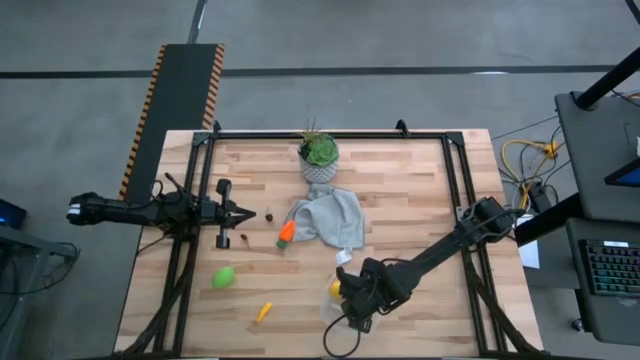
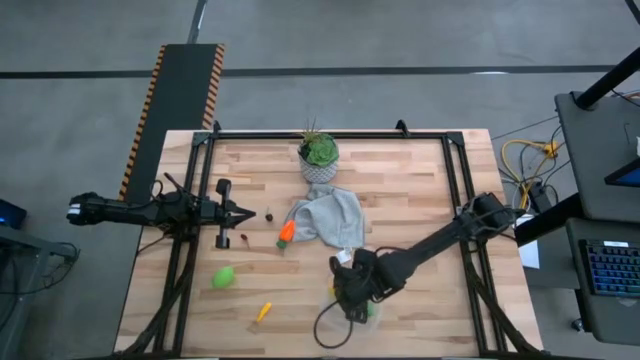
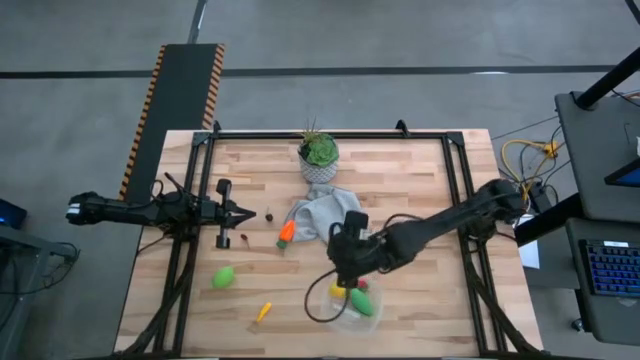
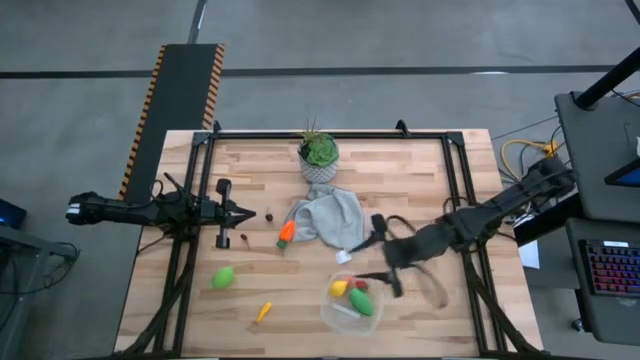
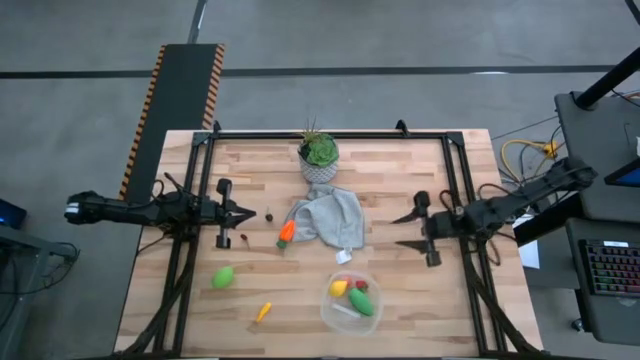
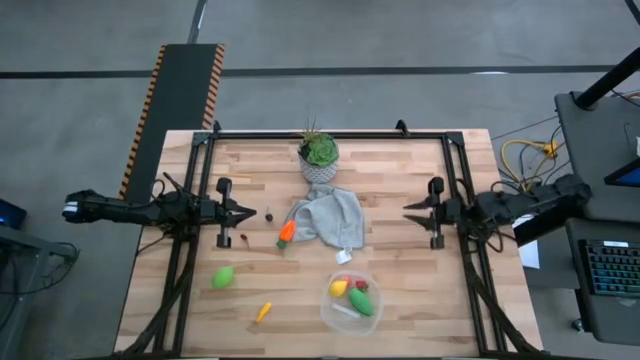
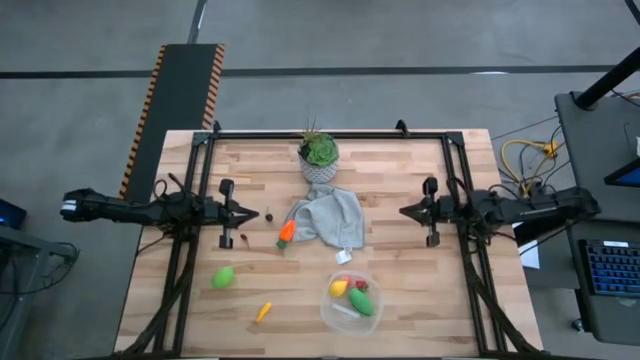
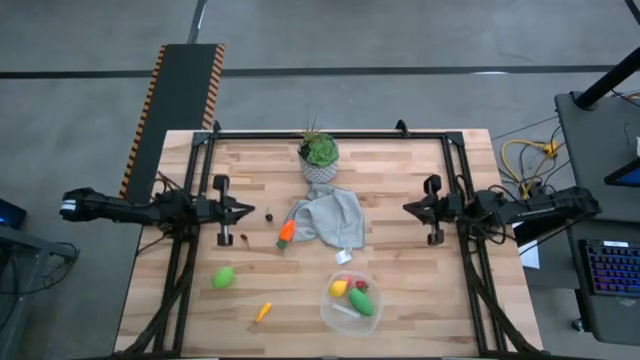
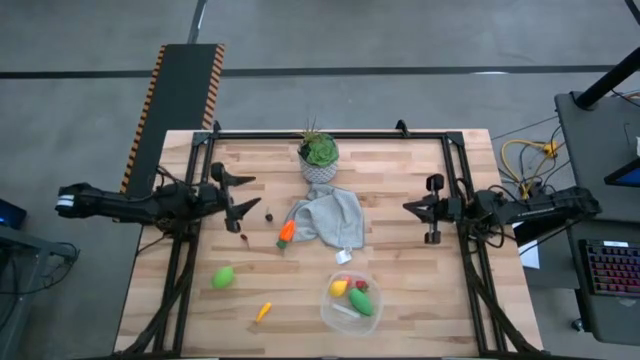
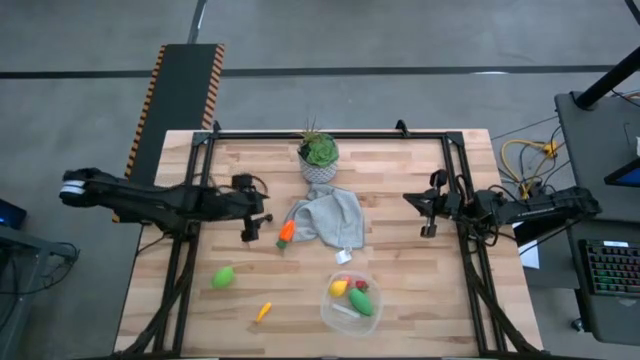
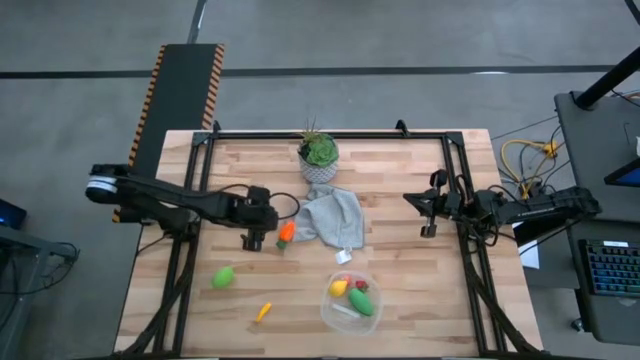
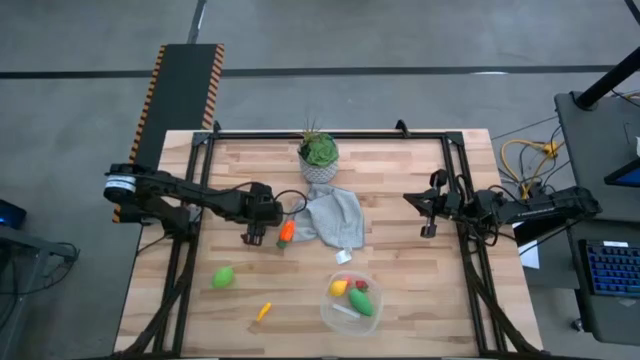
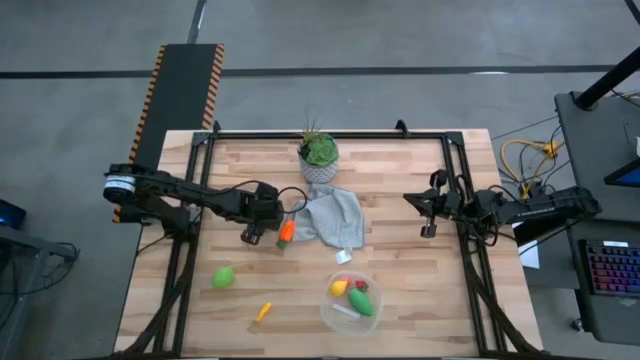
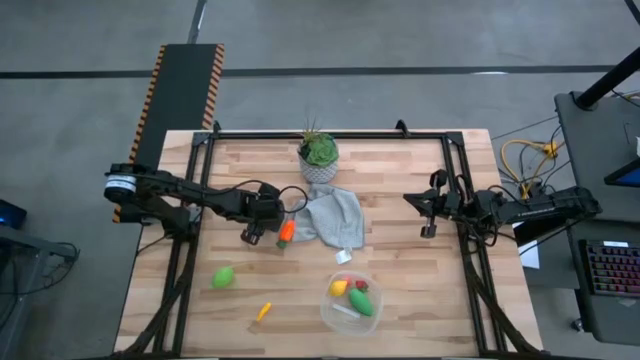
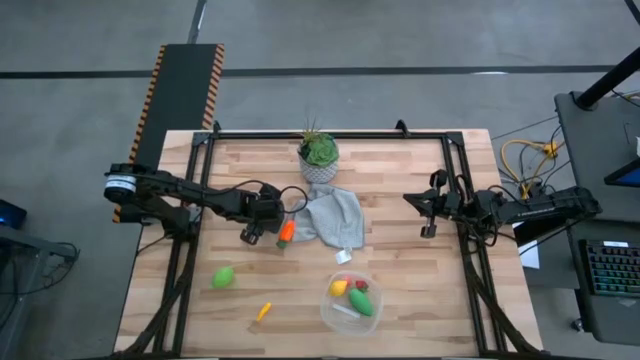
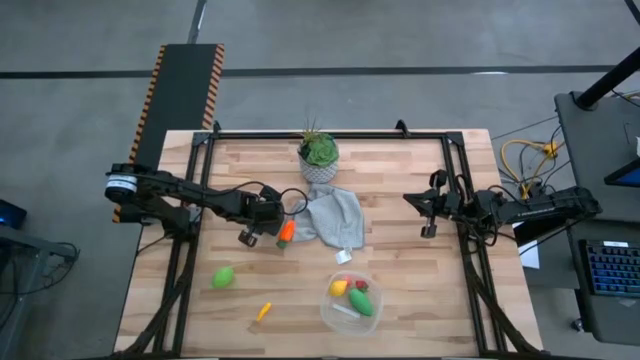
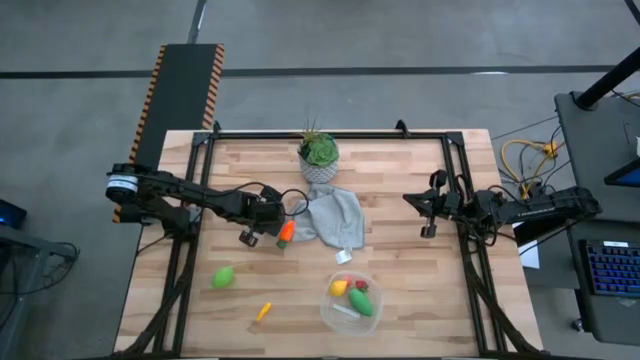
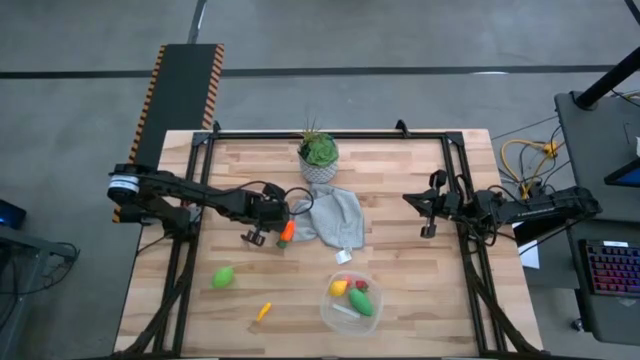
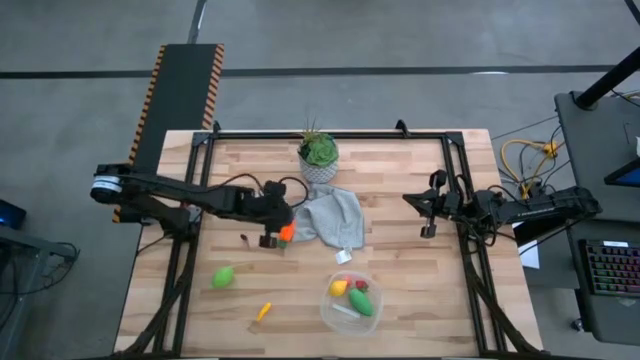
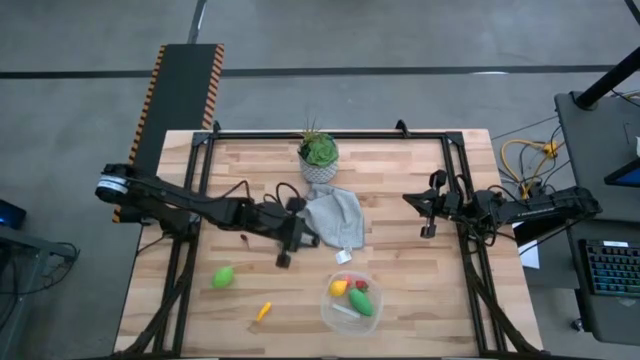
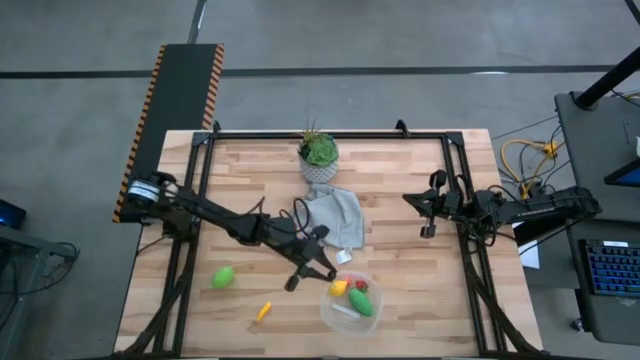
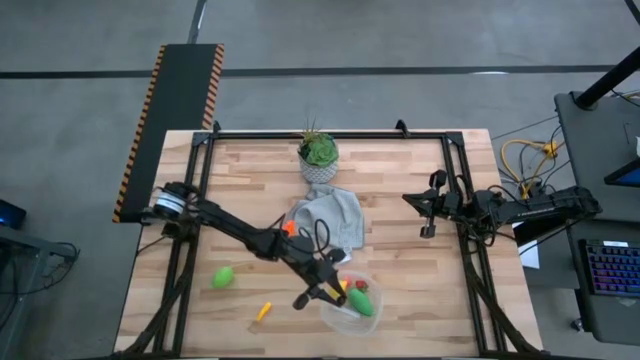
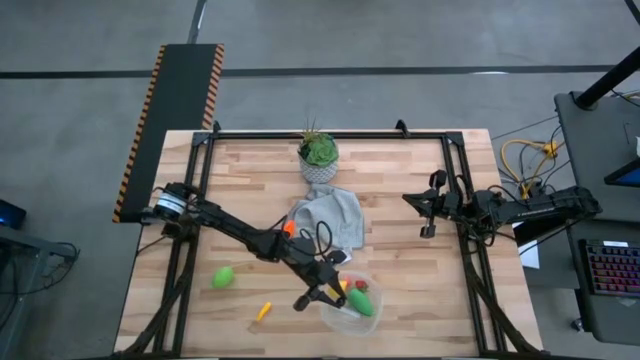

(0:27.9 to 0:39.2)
Task: Pick and placing Produce into tupperware
Put the black cherry into the transparent bin

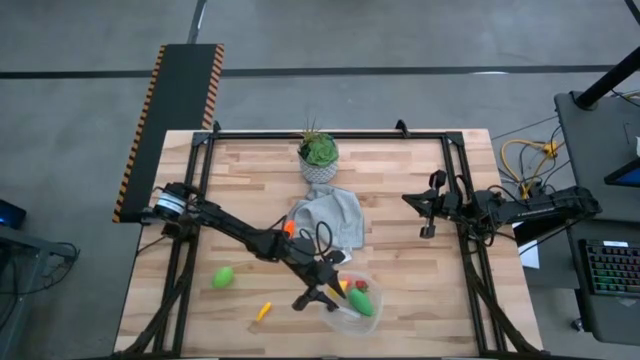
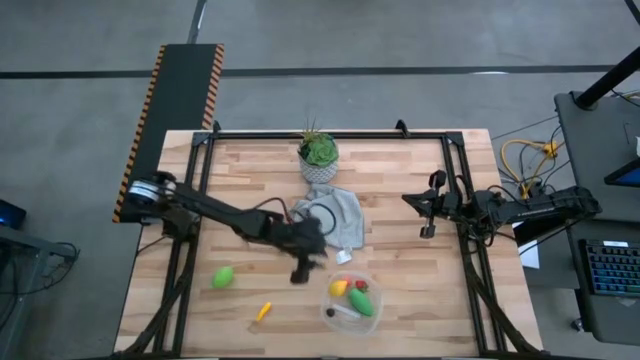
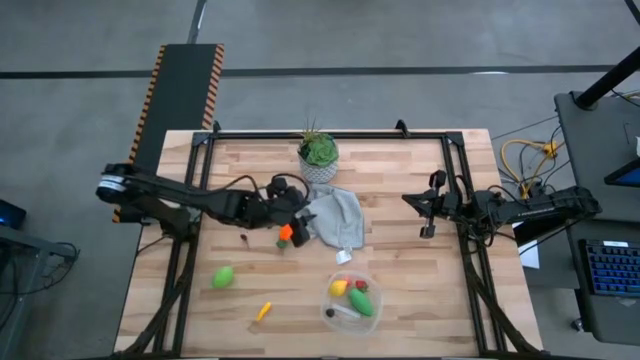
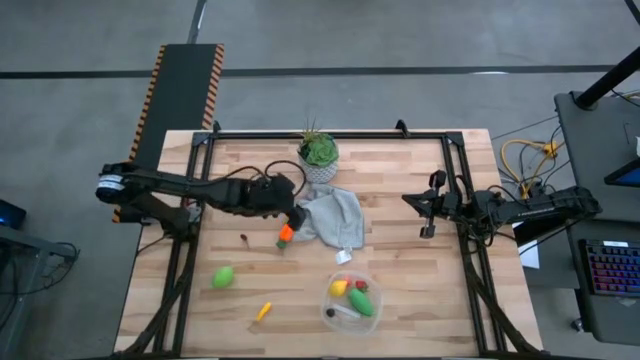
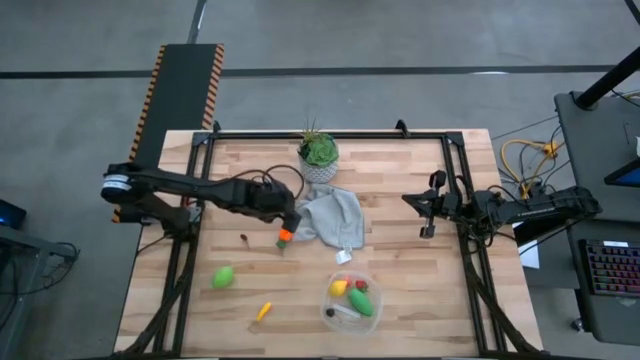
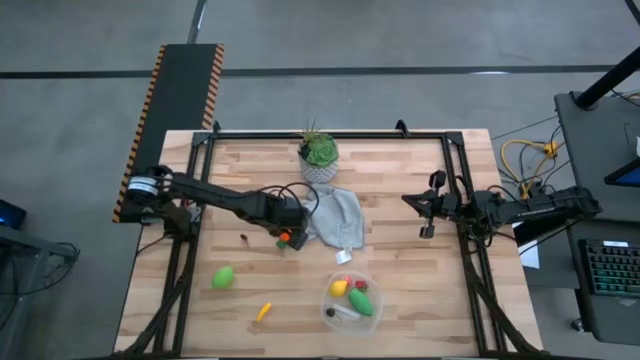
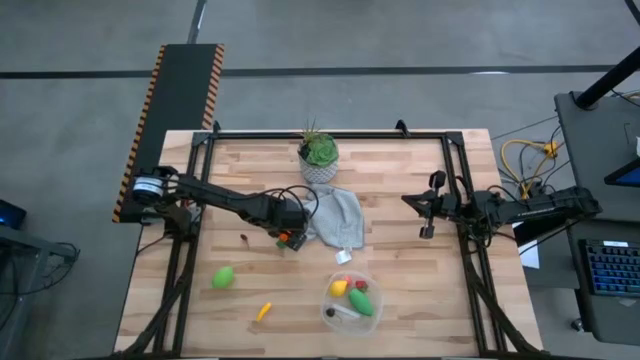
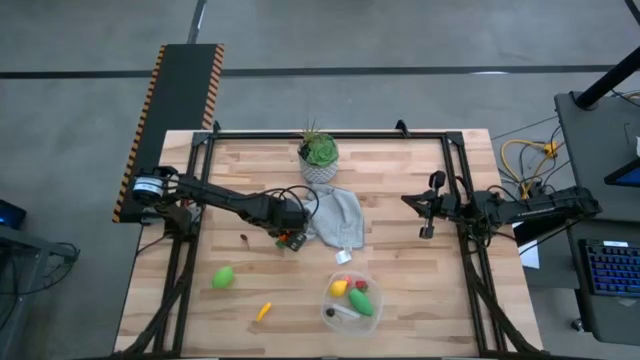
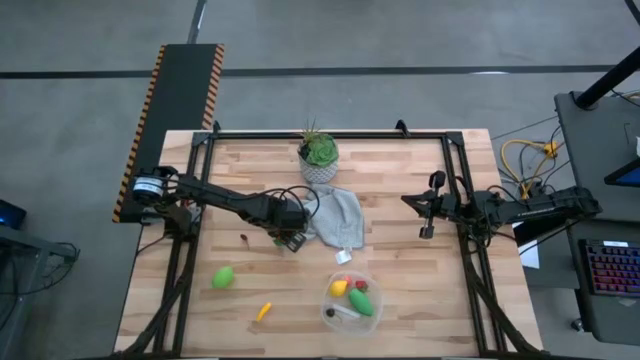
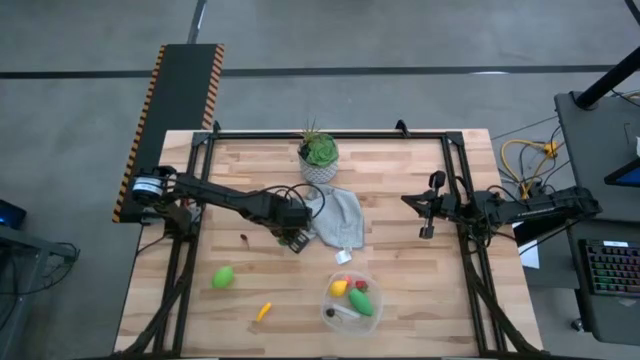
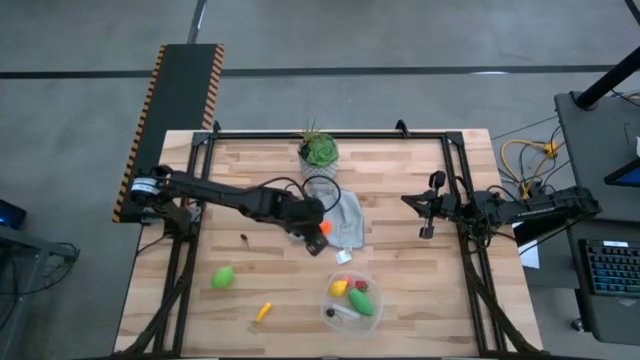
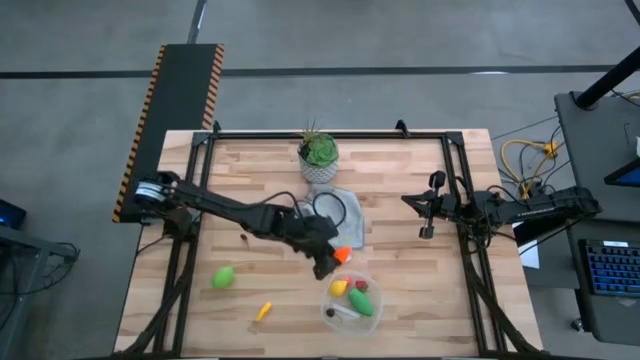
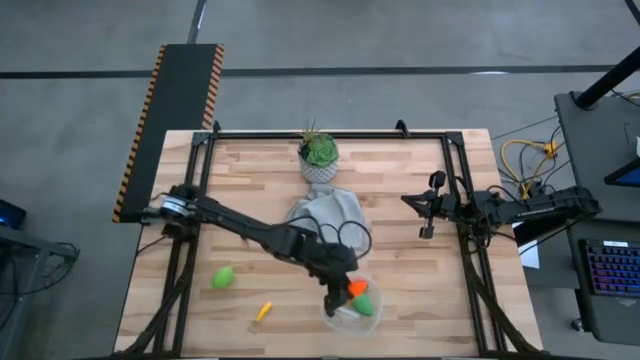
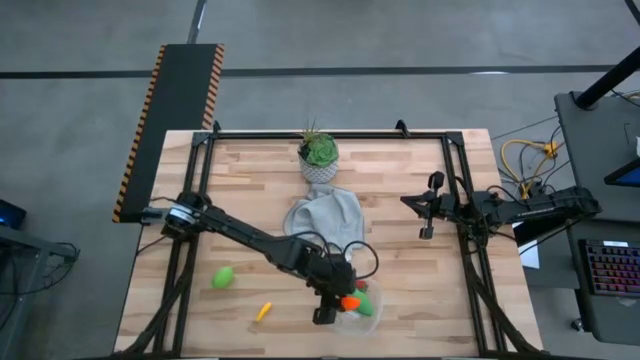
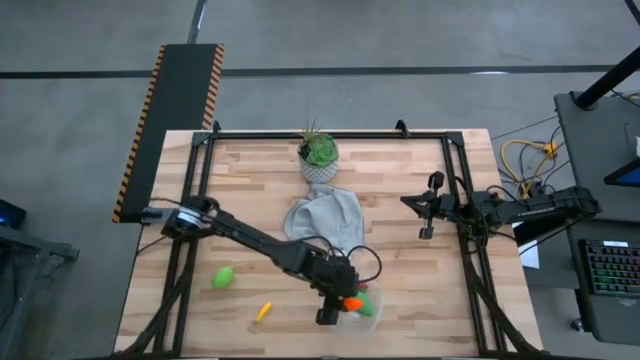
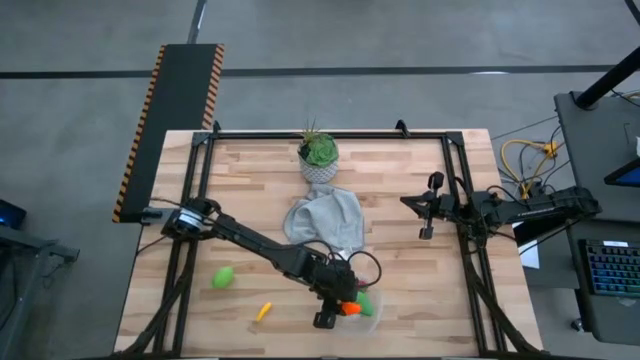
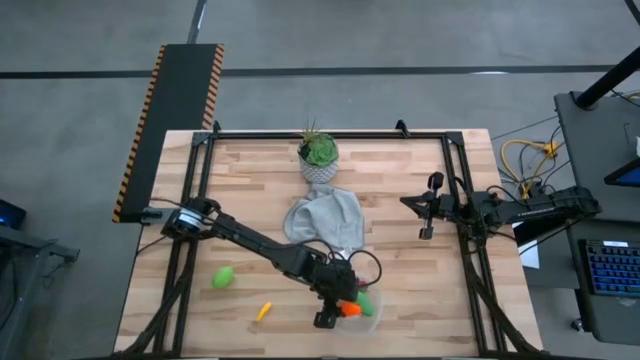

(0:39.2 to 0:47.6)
Put the carrot into the transparent bin
